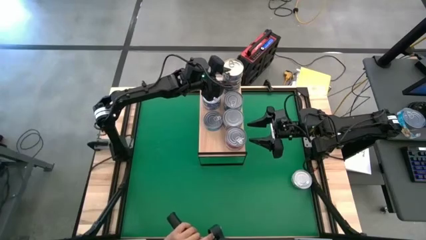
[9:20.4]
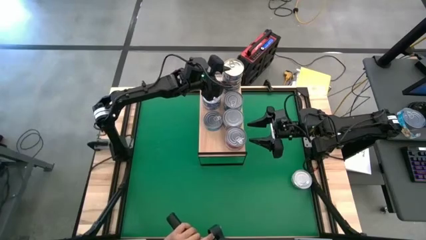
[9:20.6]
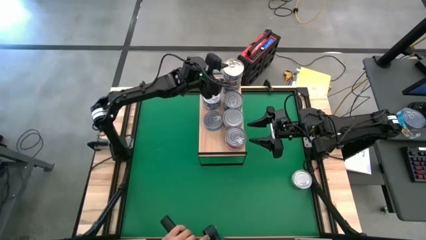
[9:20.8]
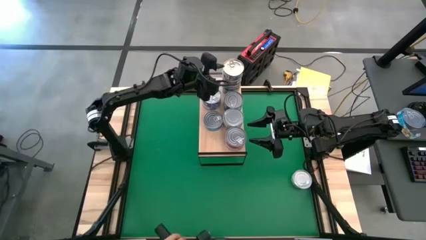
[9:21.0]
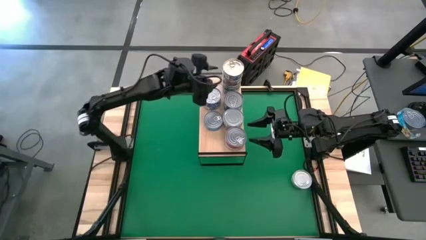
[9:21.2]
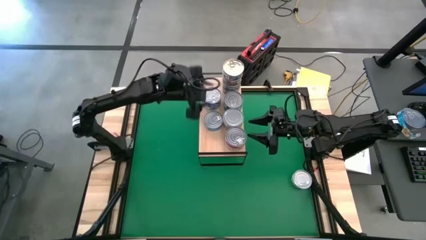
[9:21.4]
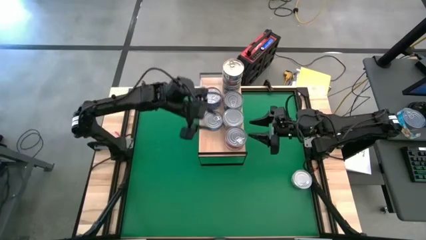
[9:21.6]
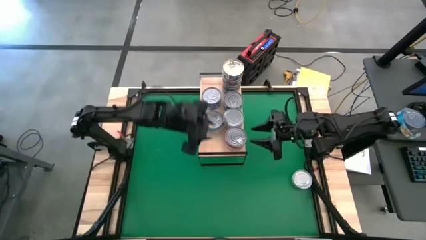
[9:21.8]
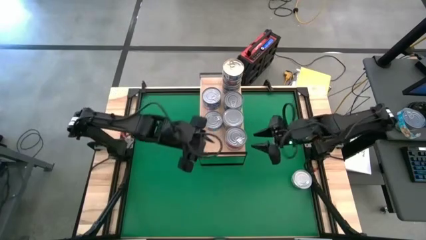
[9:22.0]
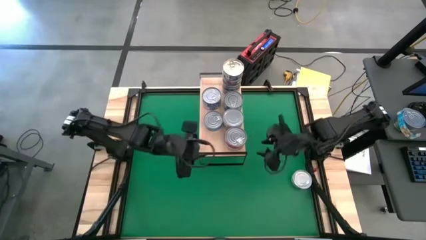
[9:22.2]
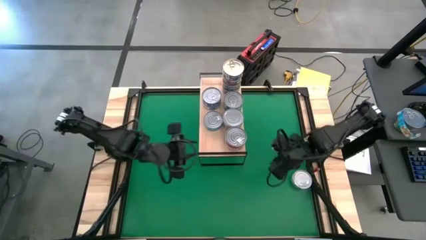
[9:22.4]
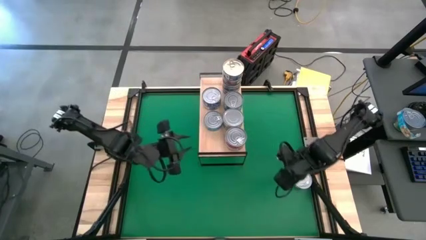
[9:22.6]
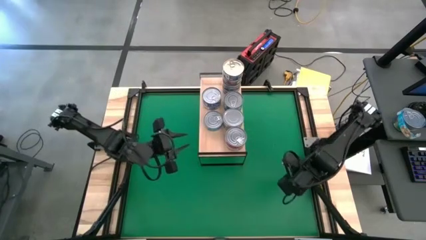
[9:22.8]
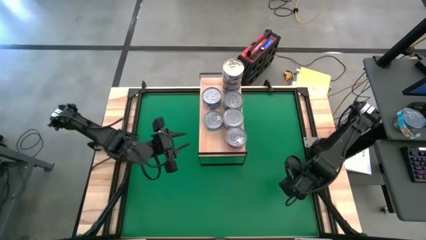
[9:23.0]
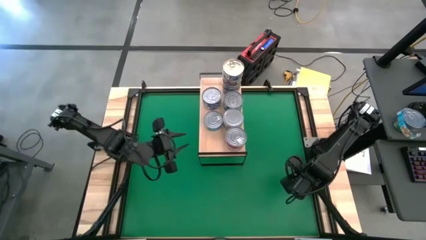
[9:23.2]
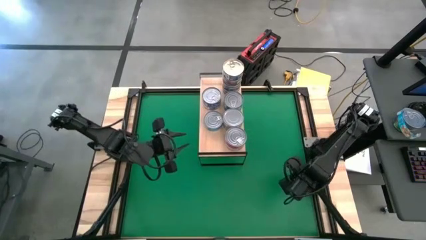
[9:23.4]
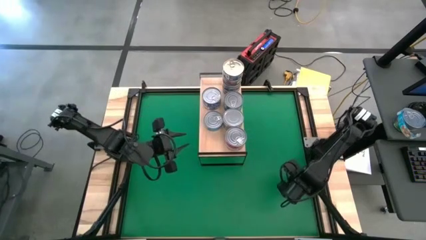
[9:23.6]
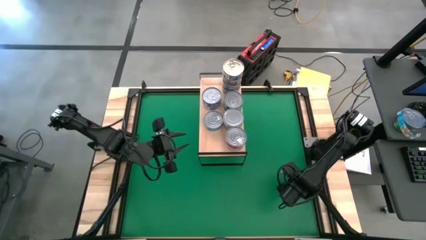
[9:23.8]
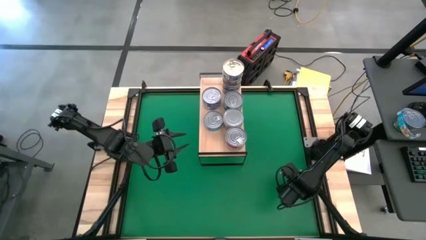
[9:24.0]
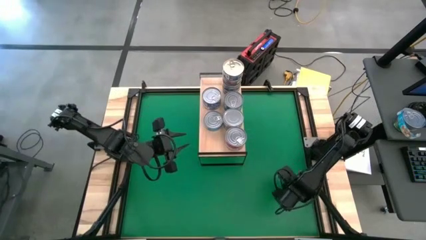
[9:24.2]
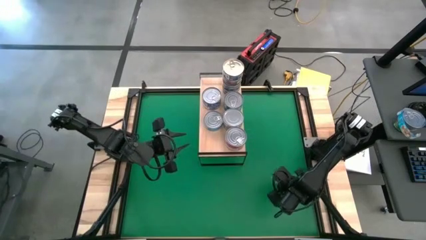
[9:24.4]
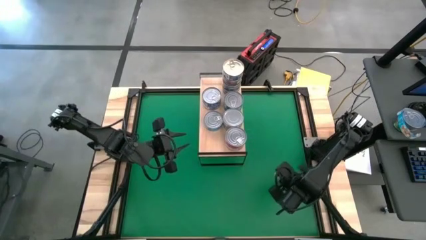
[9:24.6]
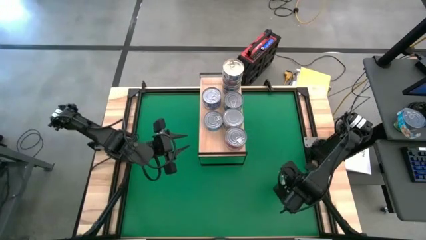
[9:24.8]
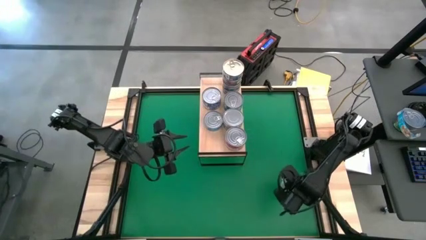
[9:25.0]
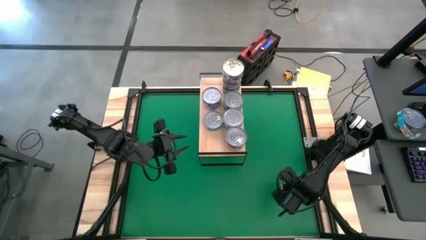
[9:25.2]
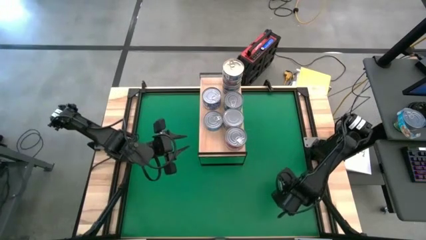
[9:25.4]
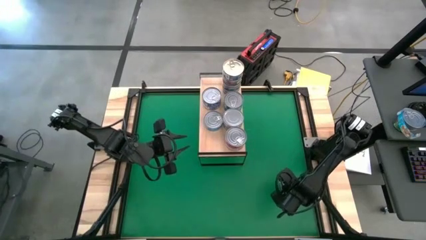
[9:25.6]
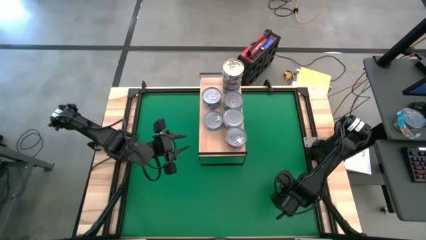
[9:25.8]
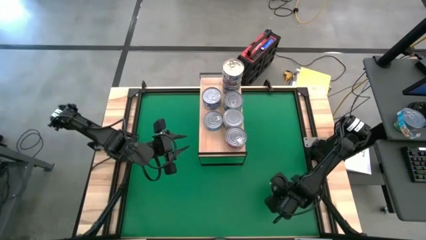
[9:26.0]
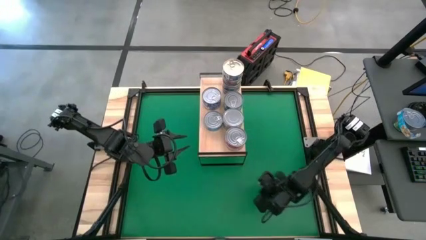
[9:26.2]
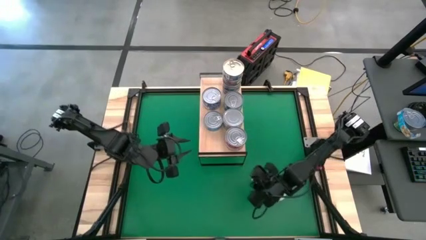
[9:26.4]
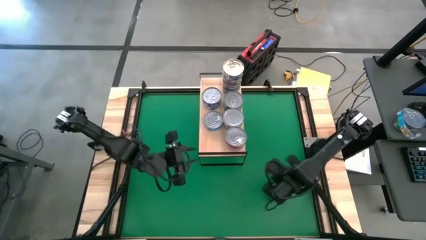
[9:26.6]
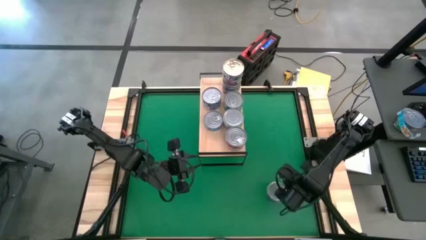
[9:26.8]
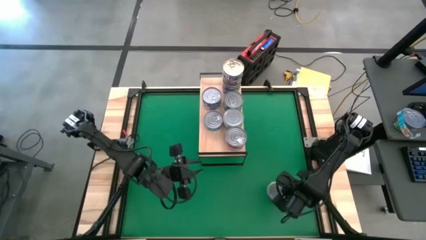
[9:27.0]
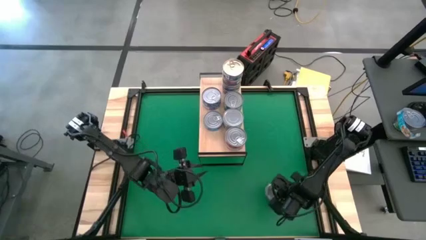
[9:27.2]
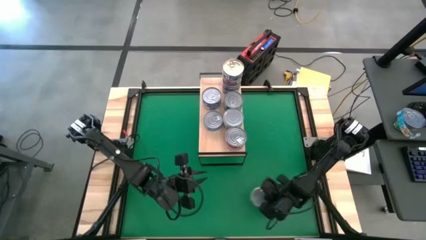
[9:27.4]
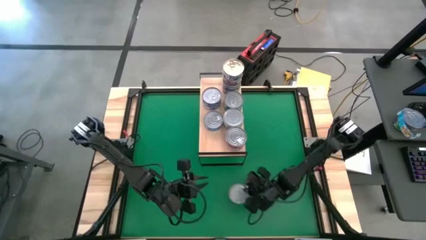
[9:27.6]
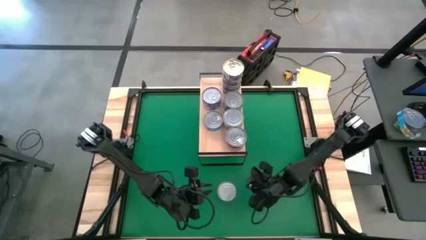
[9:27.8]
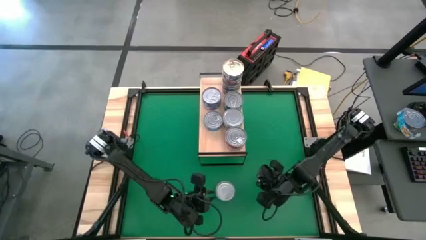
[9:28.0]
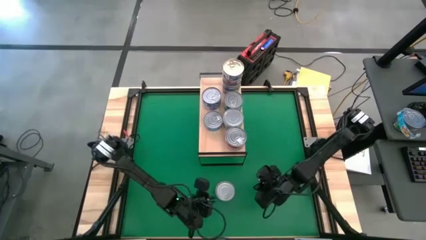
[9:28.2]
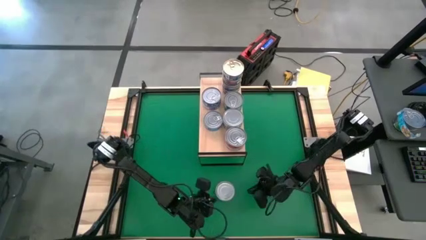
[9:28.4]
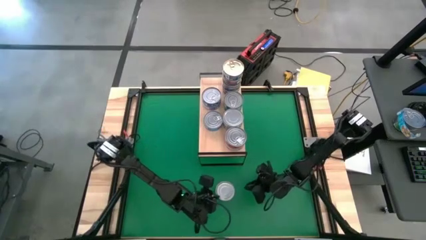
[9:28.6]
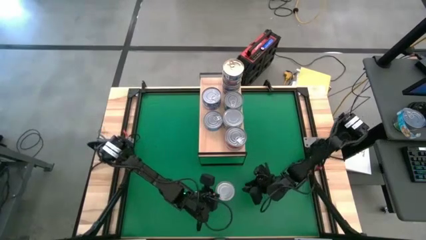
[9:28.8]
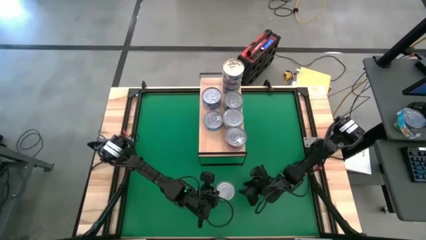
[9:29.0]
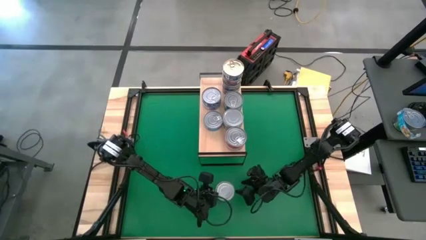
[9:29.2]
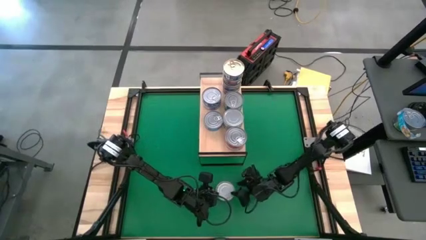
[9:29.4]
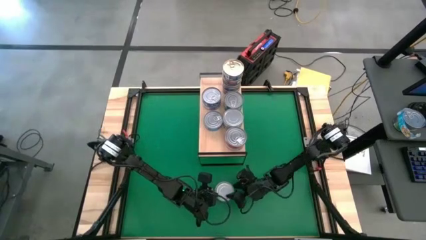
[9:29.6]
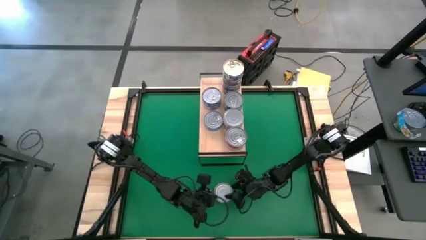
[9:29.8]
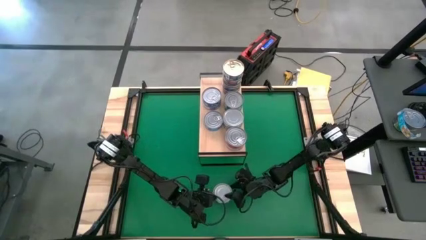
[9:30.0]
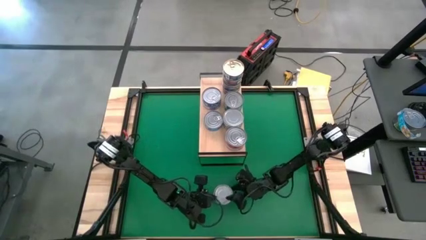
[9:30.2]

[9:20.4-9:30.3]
Task: Stack canned seafood by type on shelf
Stack the green tuna can on top of the green tuna can on the shelf

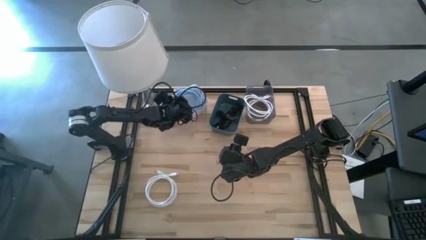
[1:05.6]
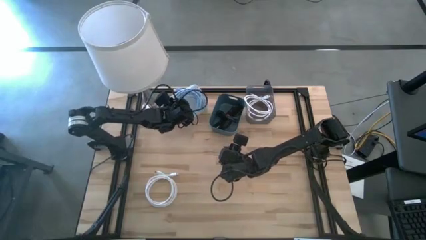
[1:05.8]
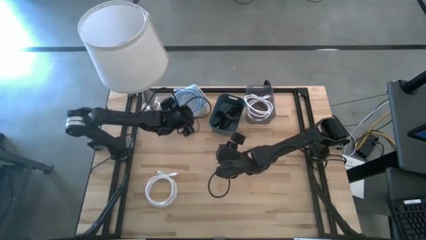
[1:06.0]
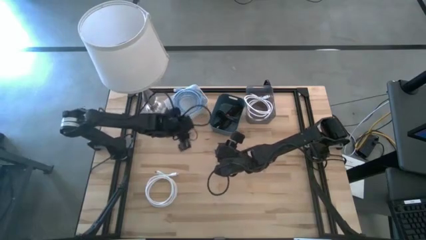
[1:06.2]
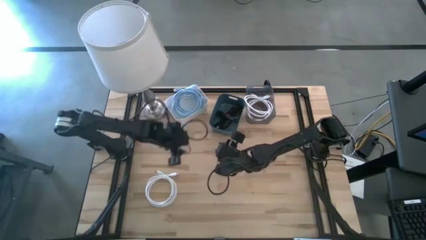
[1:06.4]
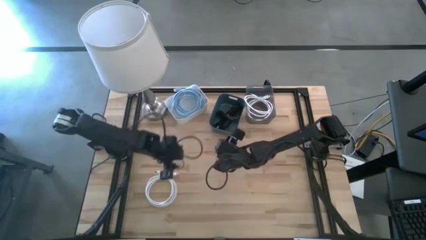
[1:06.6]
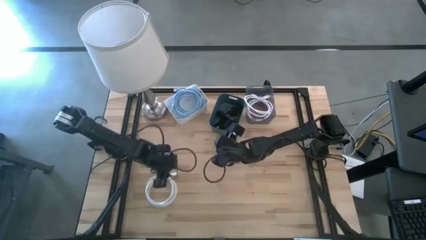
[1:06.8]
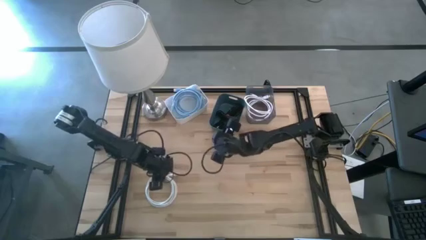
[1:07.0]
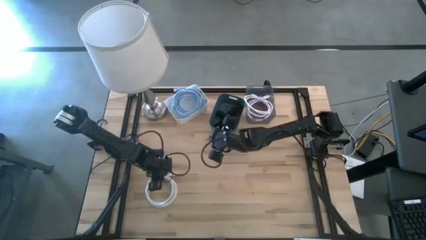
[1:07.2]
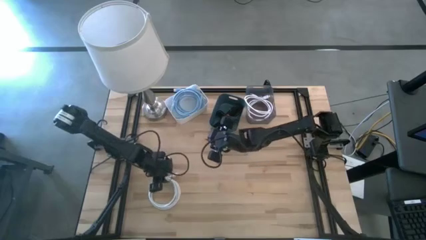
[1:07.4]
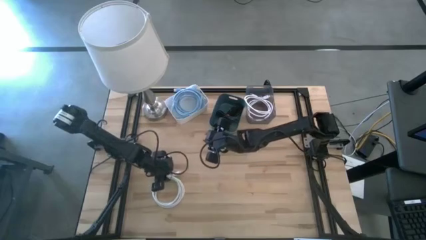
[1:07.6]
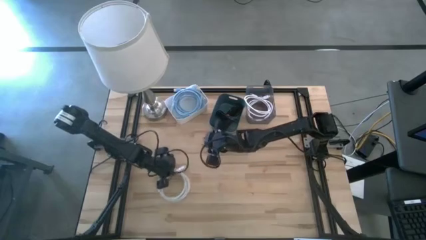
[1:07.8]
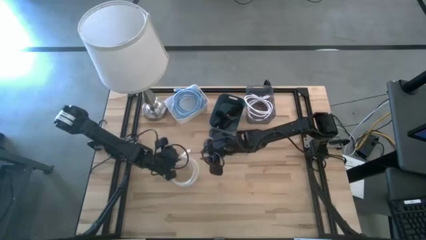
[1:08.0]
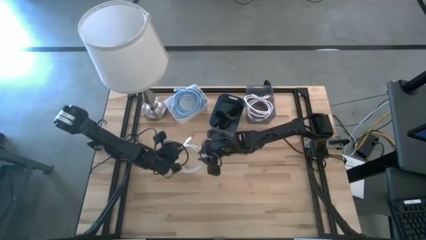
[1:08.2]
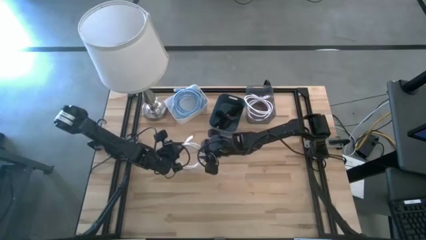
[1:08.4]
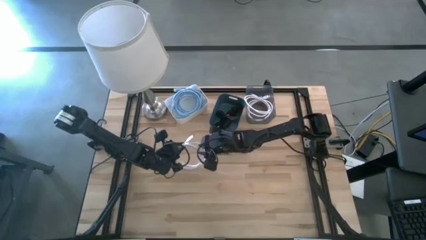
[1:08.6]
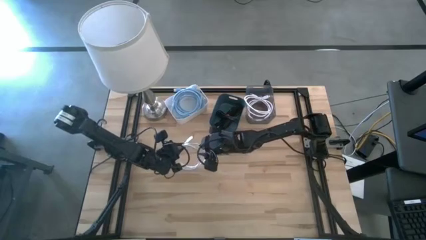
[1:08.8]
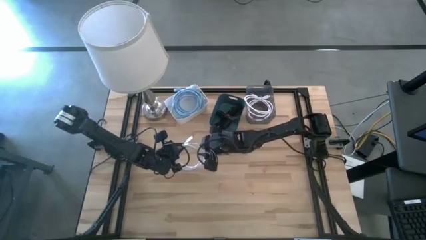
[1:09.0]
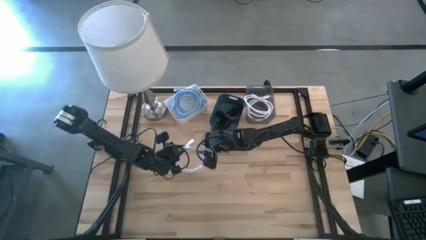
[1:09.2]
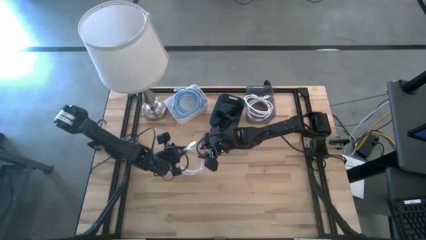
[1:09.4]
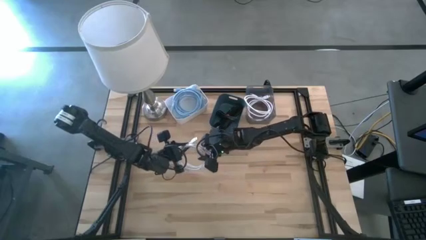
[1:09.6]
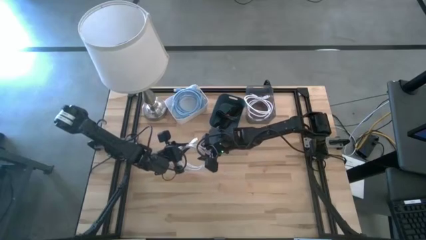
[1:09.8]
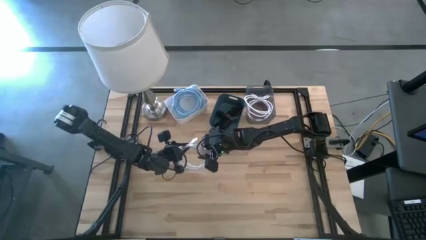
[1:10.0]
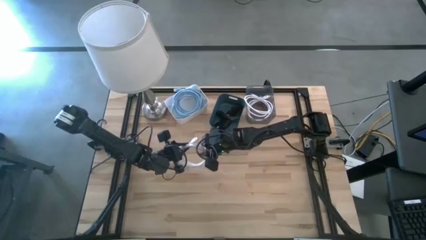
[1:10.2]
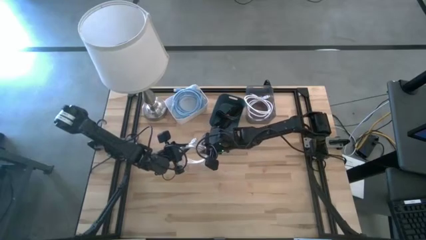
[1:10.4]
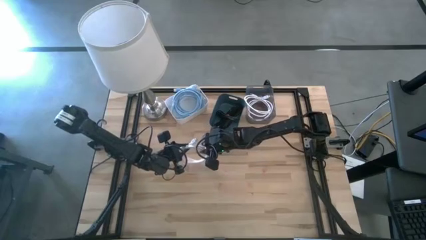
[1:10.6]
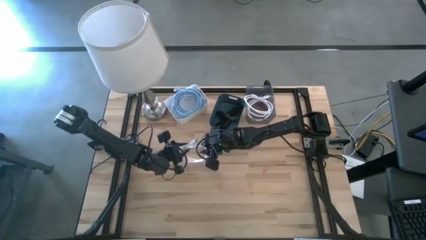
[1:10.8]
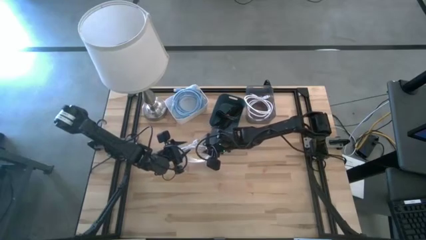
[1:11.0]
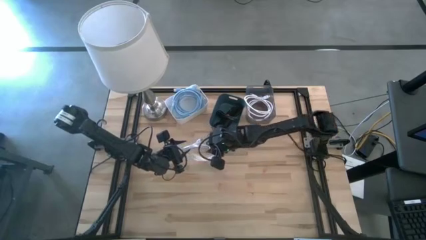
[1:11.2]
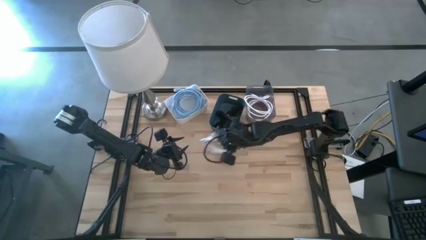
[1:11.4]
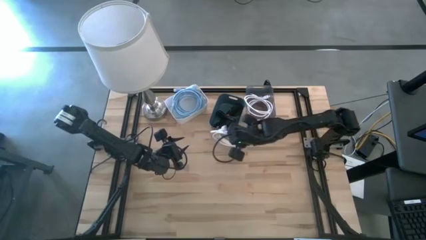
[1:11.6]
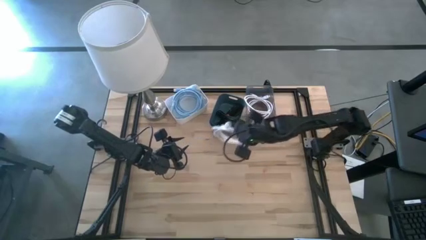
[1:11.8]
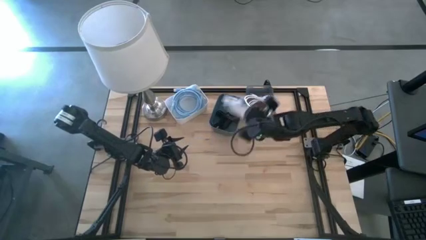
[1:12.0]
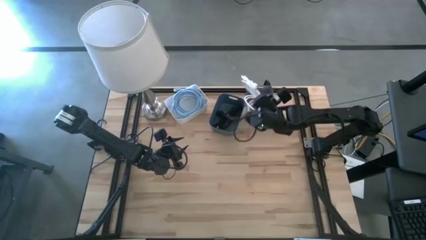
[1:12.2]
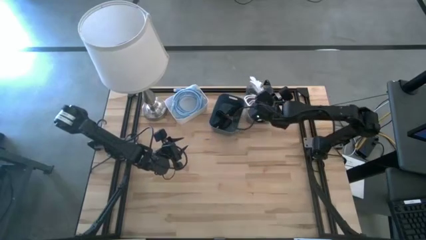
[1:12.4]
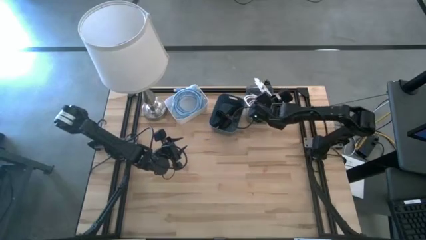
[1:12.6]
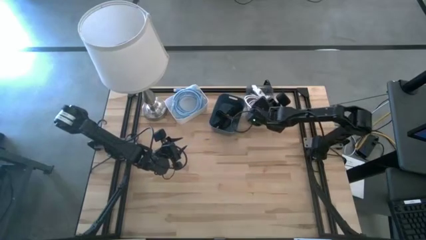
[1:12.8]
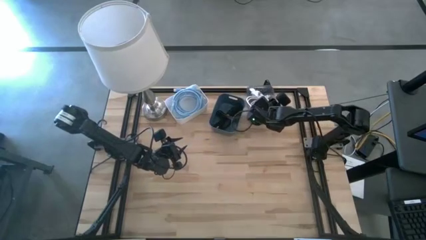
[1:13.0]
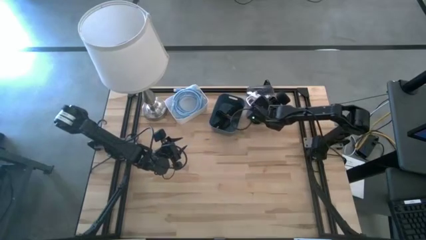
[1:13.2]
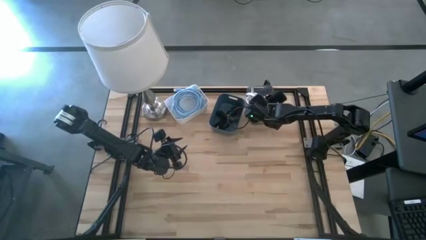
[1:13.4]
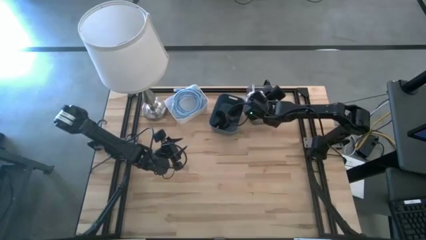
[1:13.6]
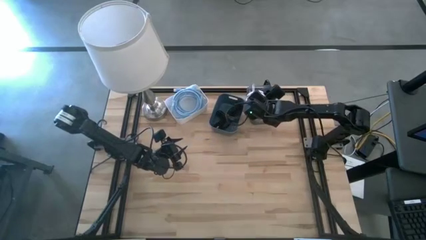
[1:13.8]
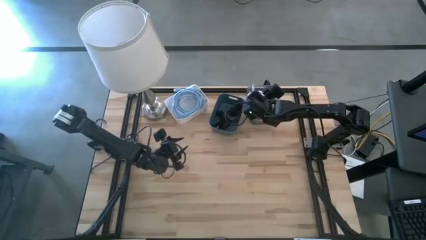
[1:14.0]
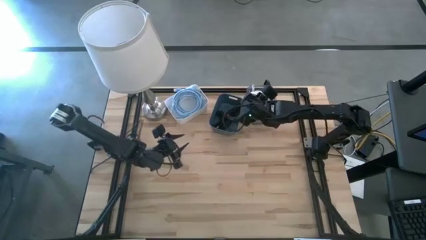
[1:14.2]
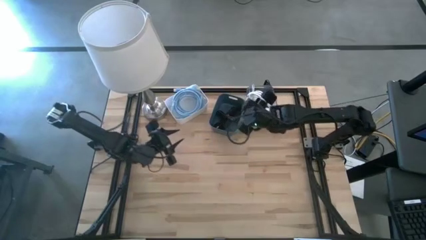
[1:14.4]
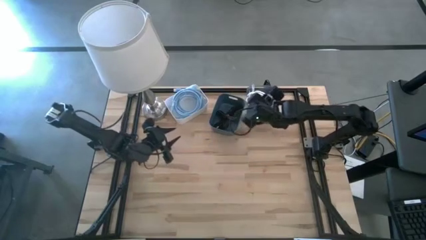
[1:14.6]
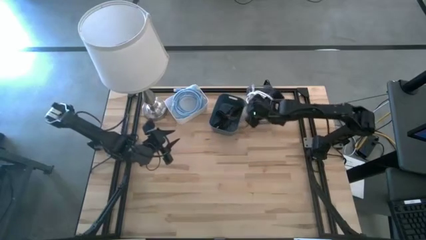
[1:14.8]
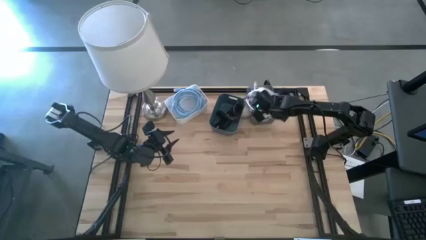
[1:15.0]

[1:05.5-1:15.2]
Task: Pick & Place USB Port
Put the white cable into the black bin
